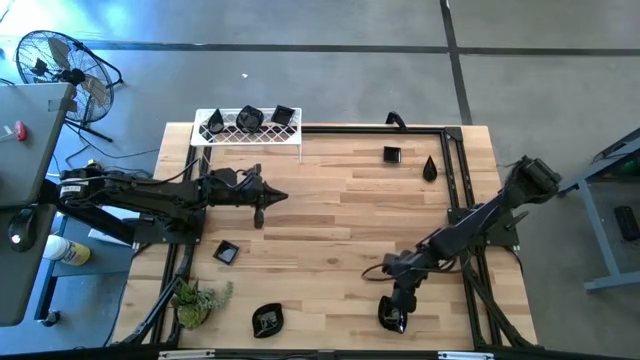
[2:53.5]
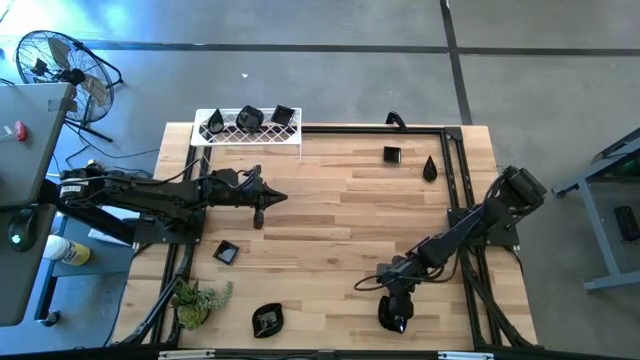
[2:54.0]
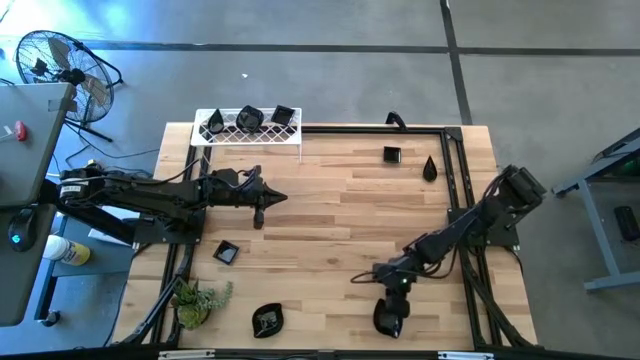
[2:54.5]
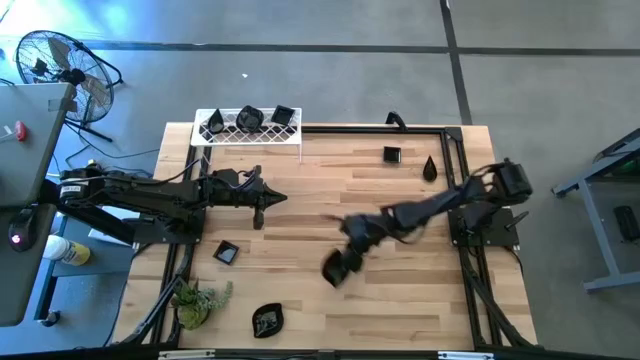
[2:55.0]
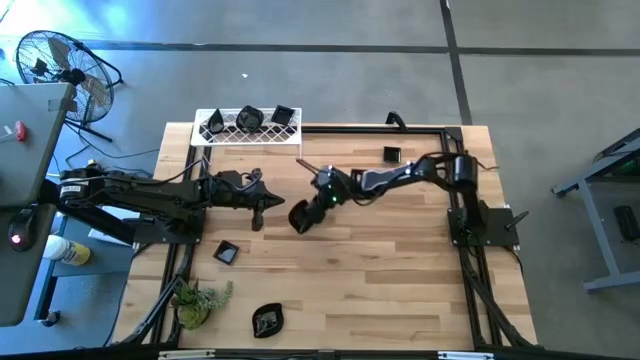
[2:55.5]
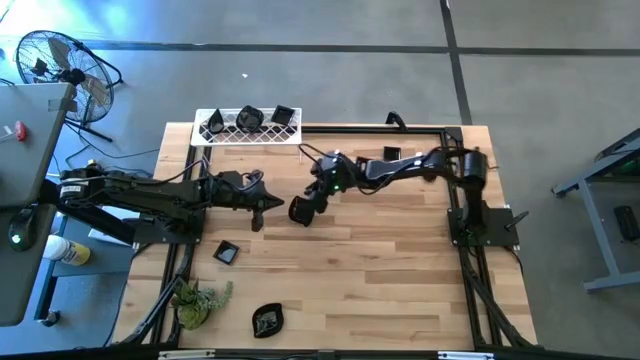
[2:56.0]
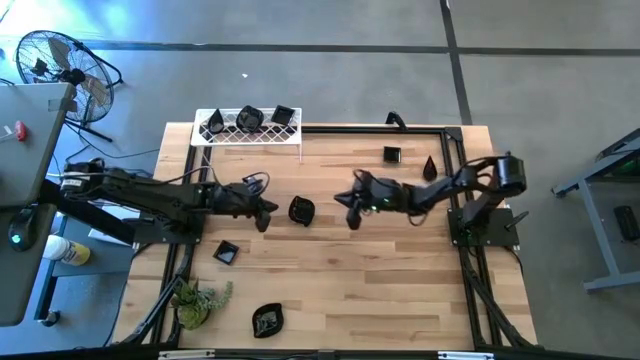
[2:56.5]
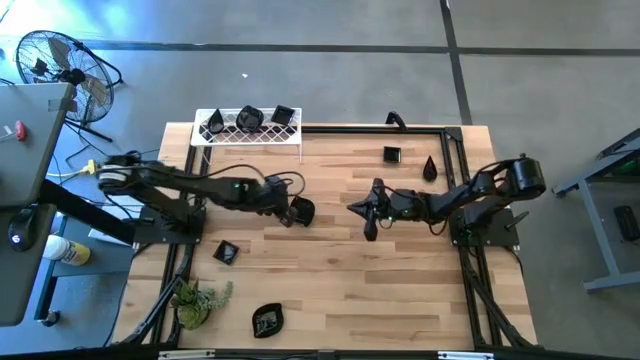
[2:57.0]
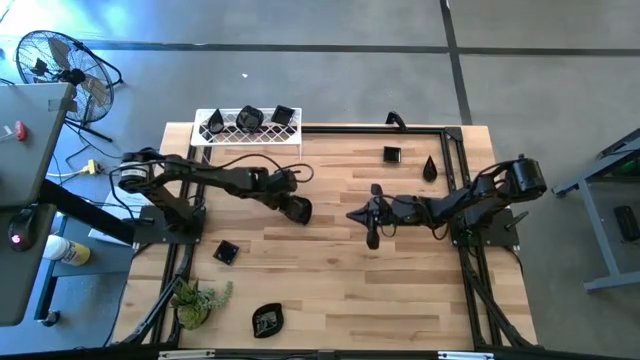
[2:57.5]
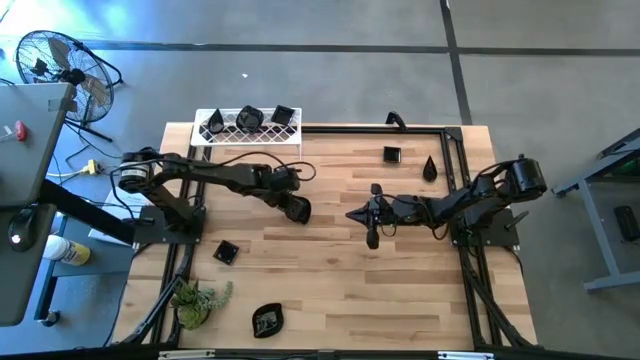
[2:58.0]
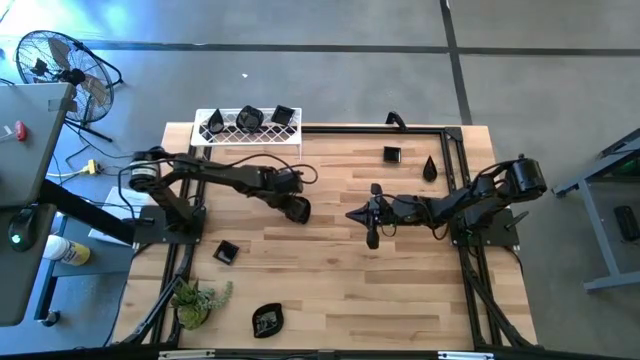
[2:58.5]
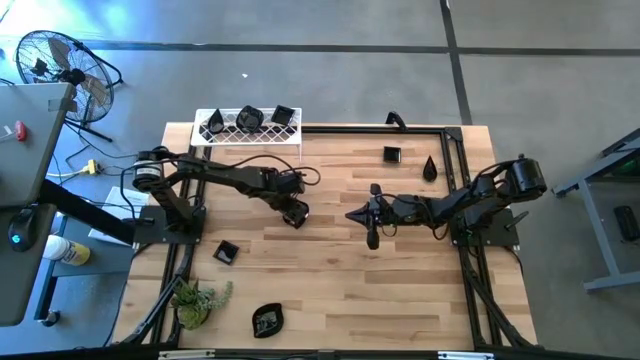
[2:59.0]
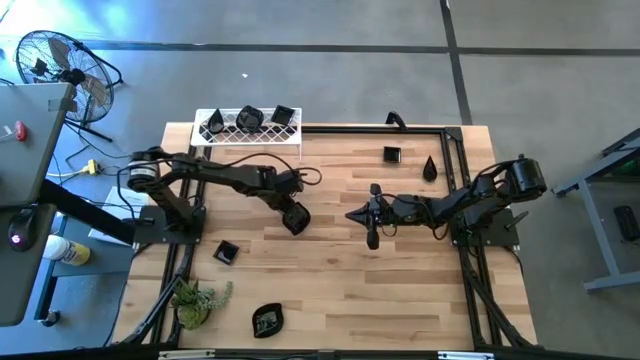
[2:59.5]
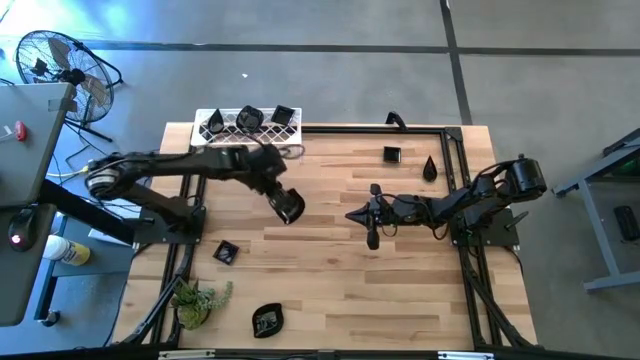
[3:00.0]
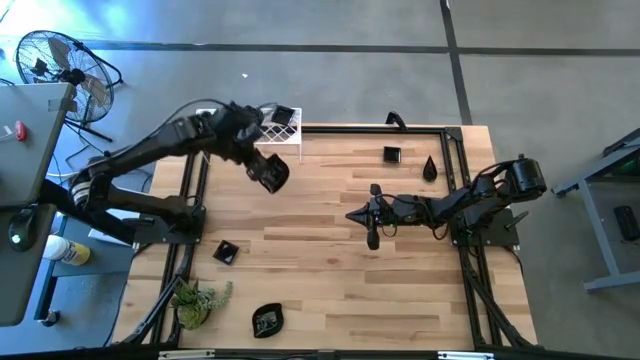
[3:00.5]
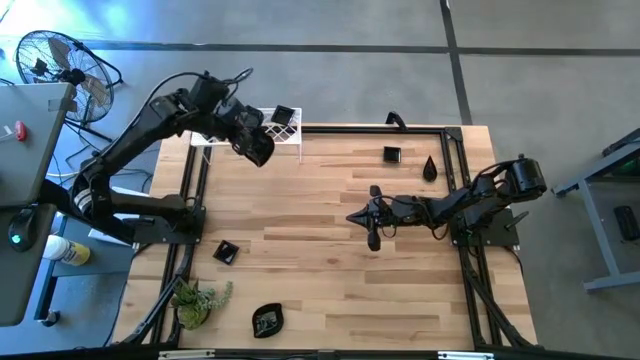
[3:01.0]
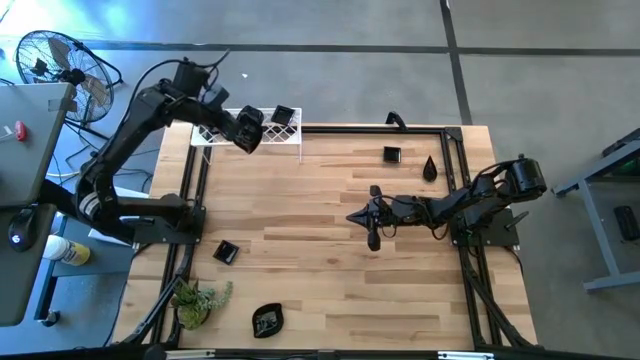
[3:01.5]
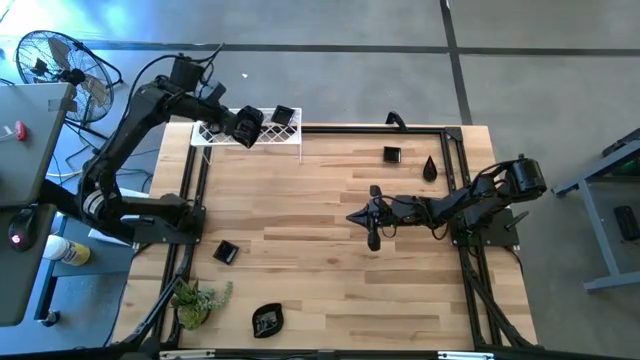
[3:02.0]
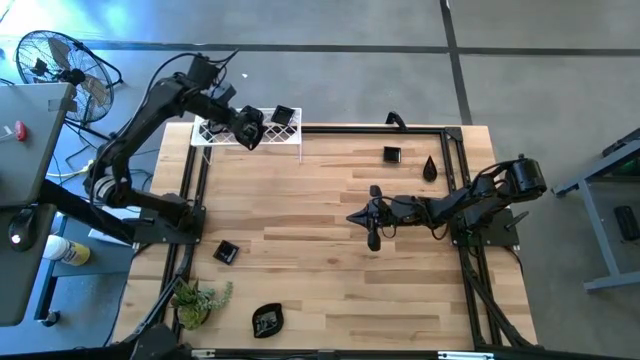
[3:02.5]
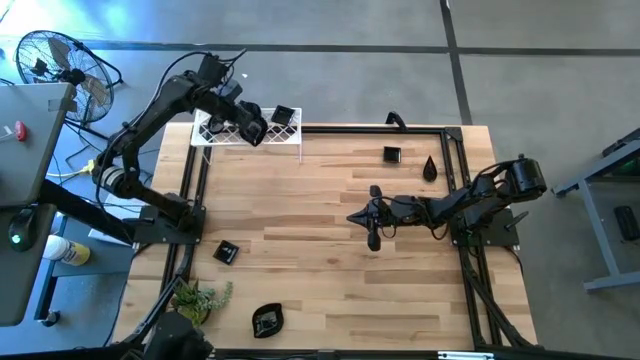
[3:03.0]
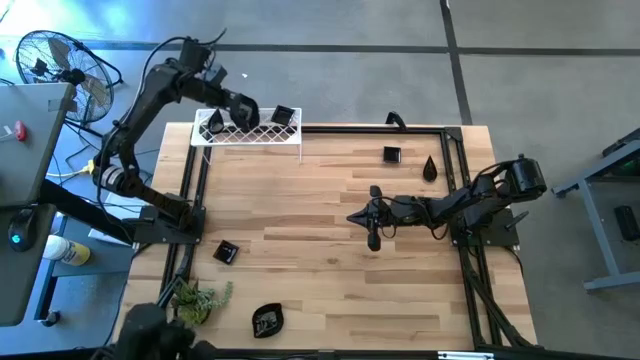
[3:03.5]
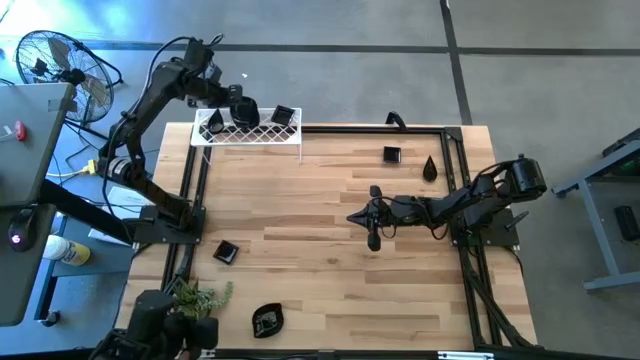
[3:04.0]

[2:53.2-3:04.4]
Task: Pick & Place Mini shaped plates
Stack the right leaf-shaped plate on top of the leaf-shaped plates on the shelf

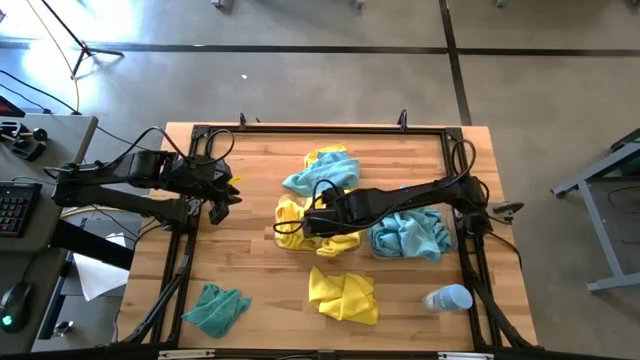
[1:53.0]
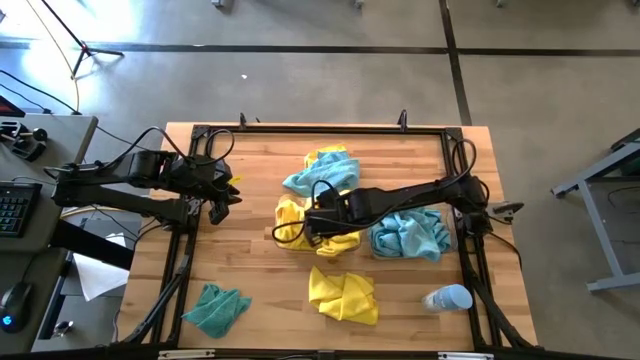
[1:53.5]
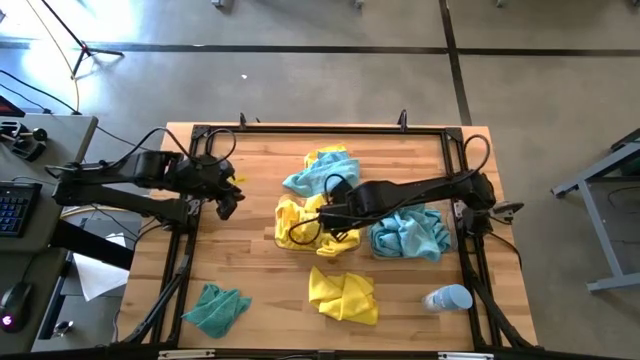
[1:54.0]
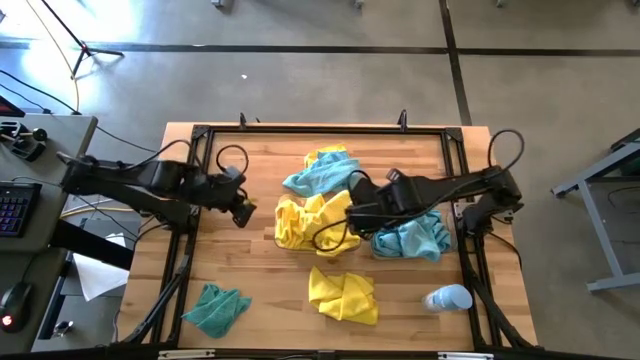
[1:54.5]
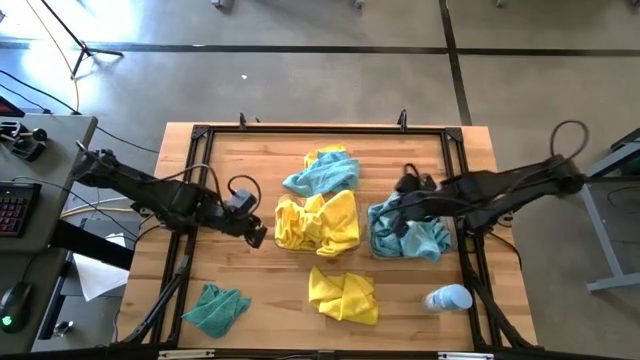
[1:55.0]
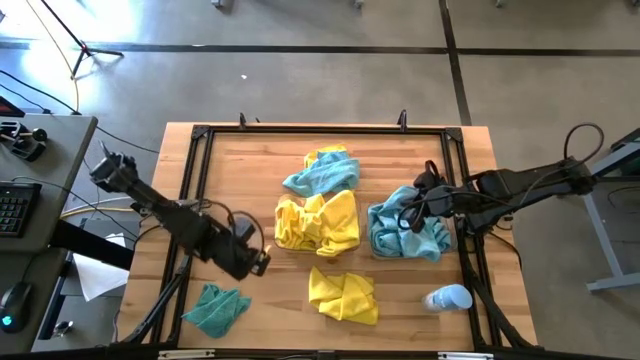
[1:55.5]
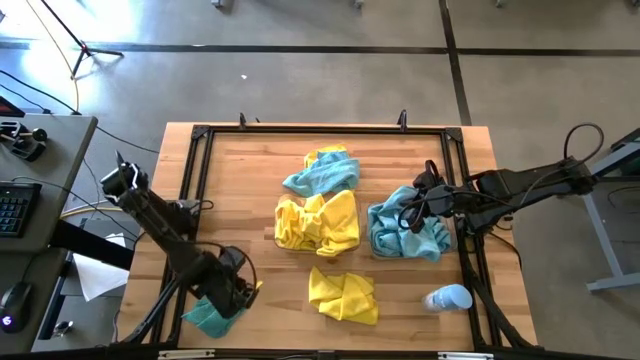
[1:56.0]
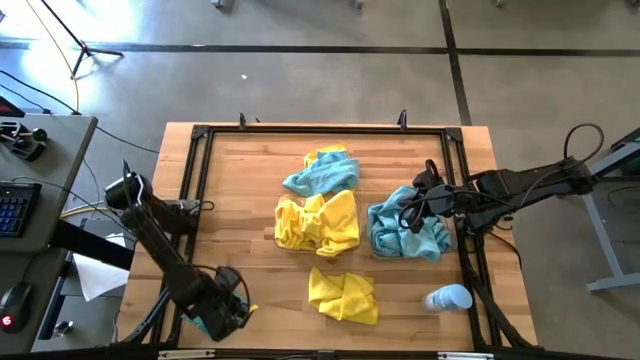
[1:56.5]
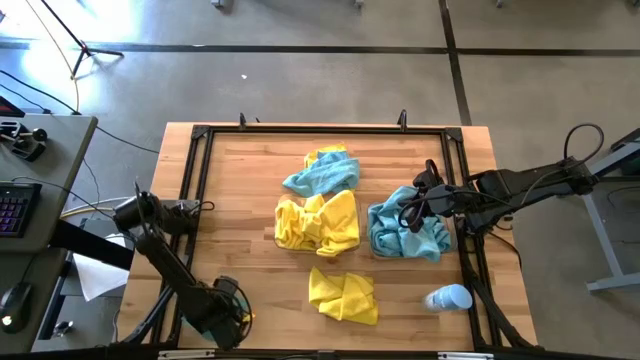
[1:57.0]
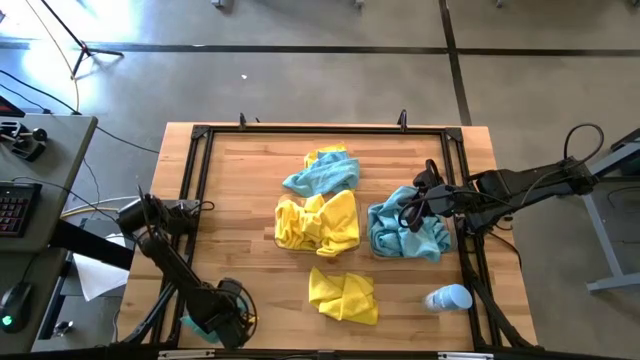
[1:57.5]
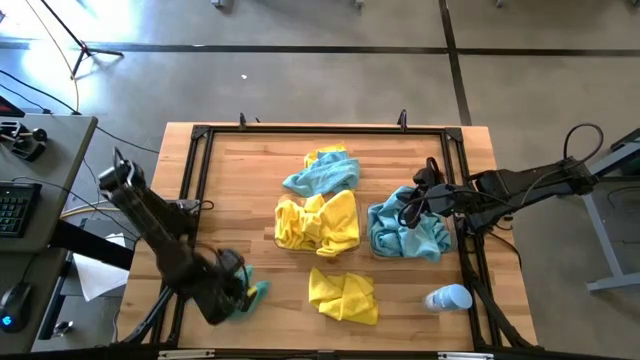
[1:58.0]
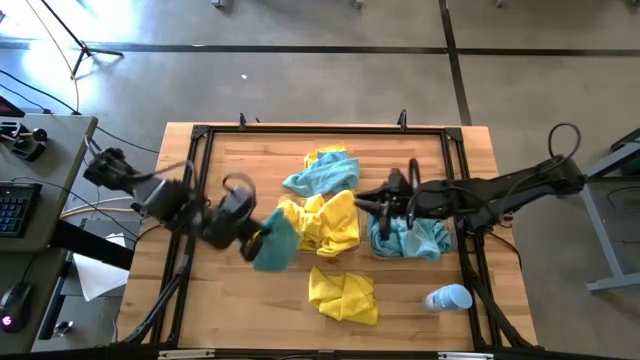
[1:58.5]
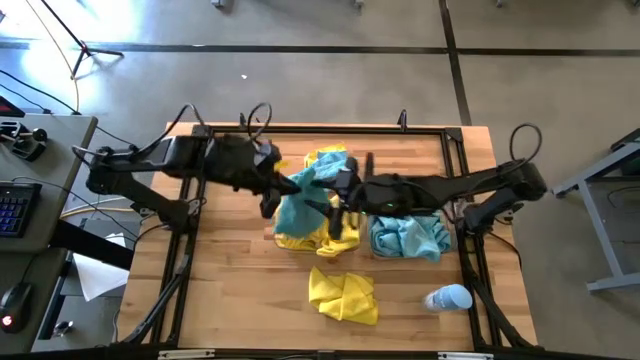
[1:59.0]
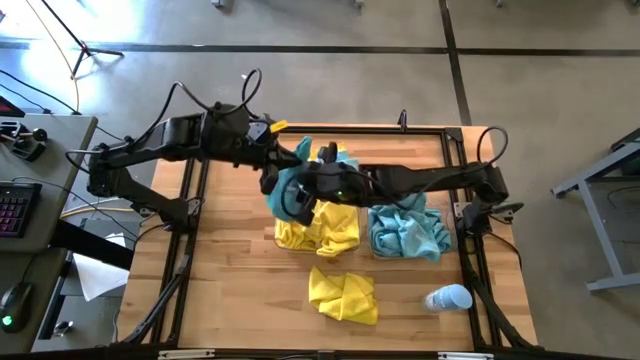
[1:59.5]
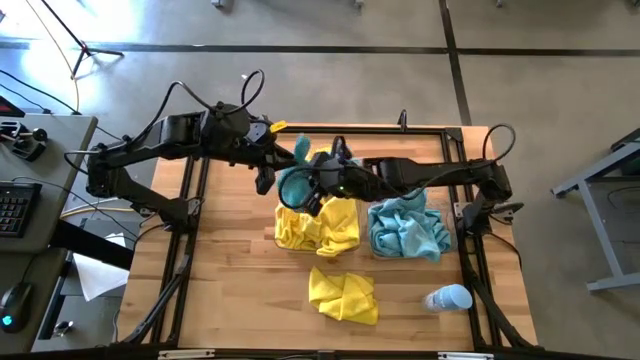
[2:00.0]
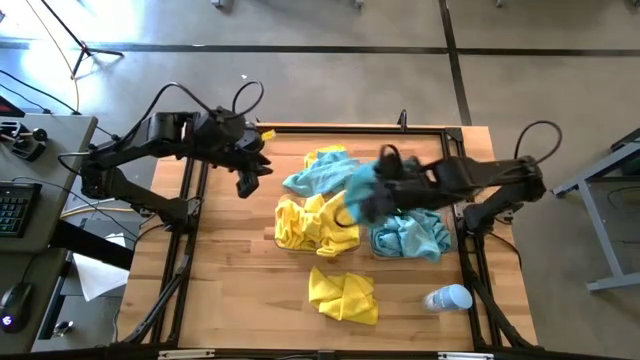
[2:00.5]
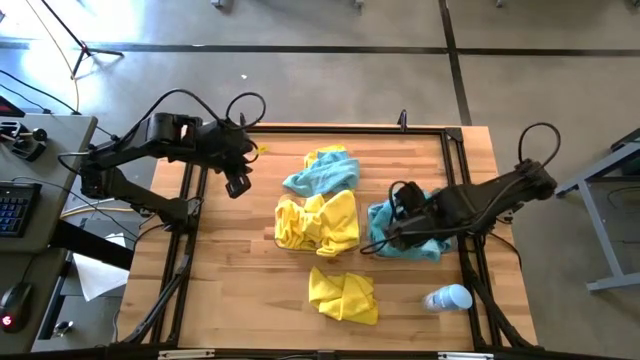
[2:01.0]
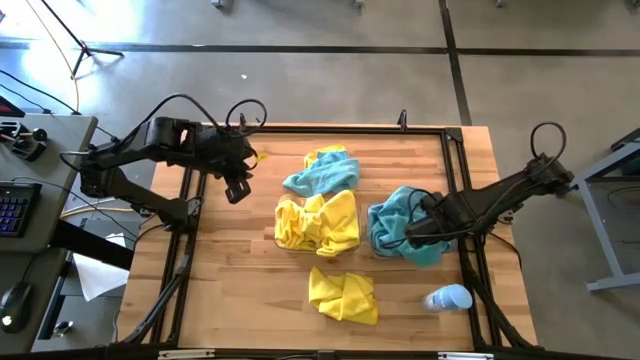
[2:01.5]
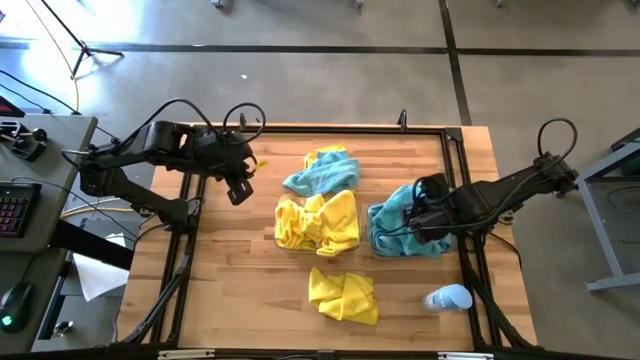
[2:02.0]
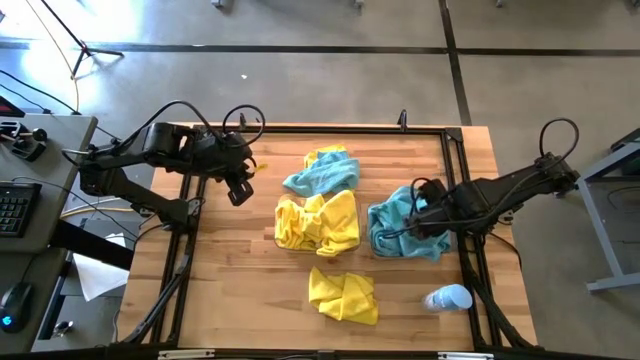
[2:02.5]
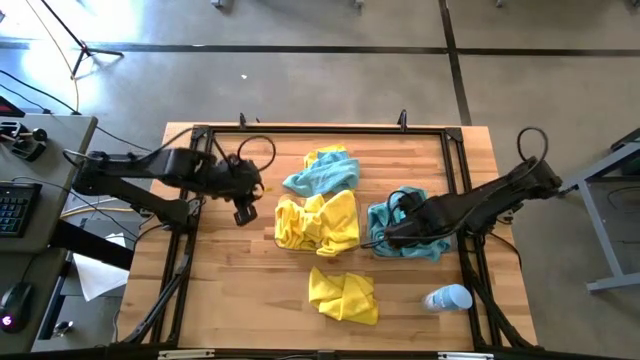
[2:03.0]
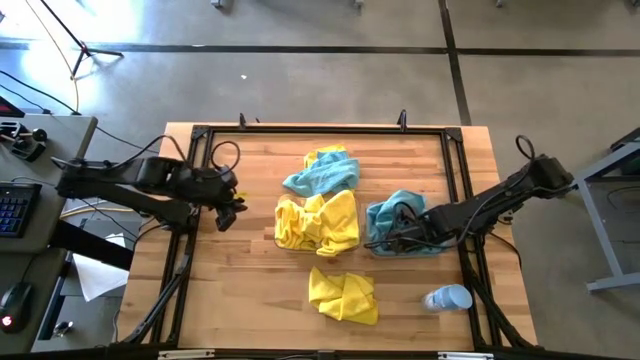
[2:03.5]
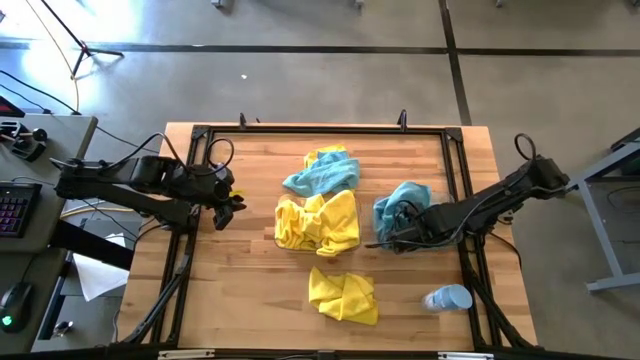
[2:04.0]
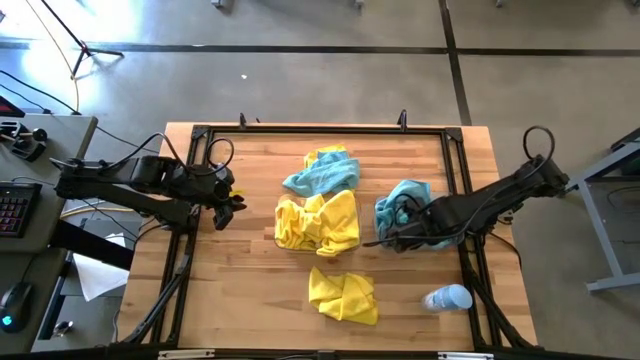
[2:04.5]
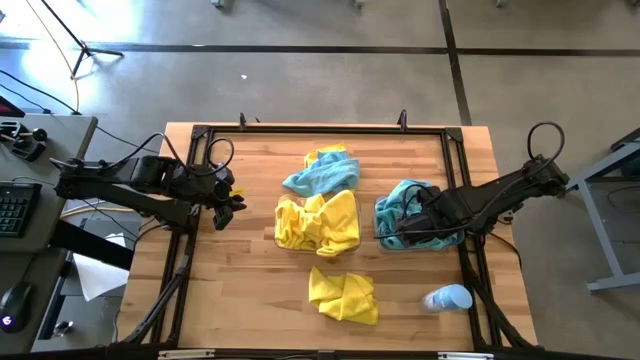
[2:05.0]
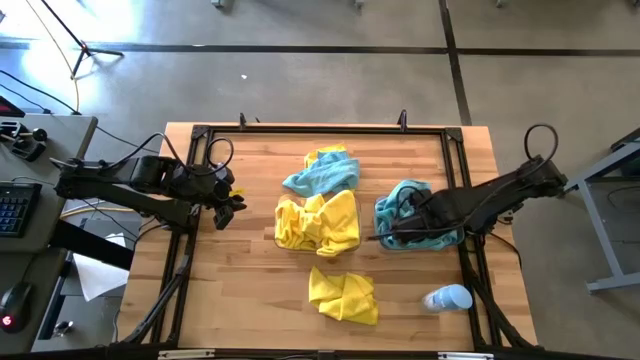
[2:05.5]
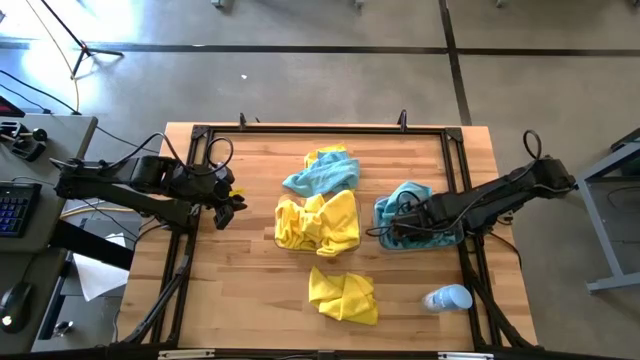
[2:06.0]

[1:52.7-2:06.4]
Task: Sort microfiber towel by color & place in baskets
Put the blue microfiber cloth into the right transparent bin
